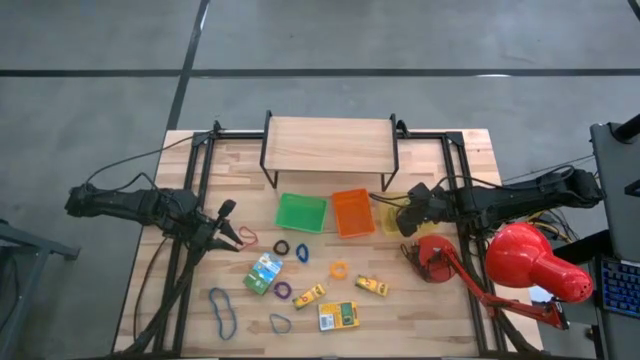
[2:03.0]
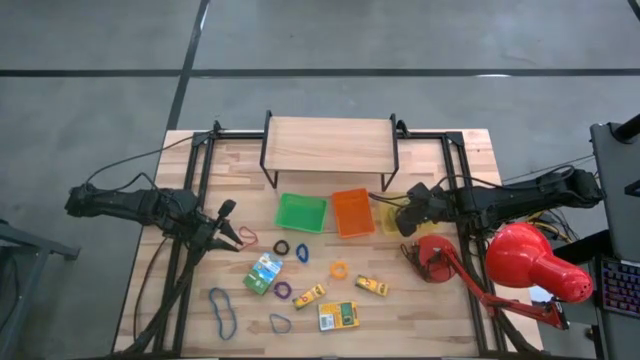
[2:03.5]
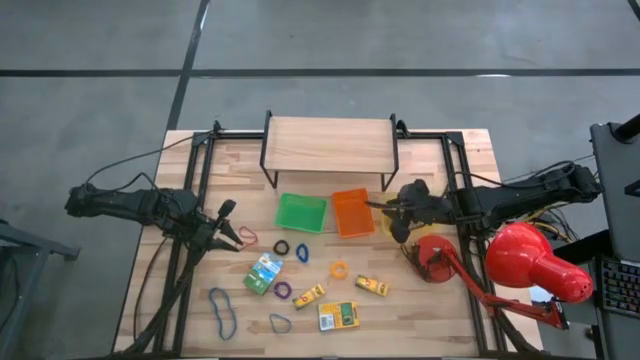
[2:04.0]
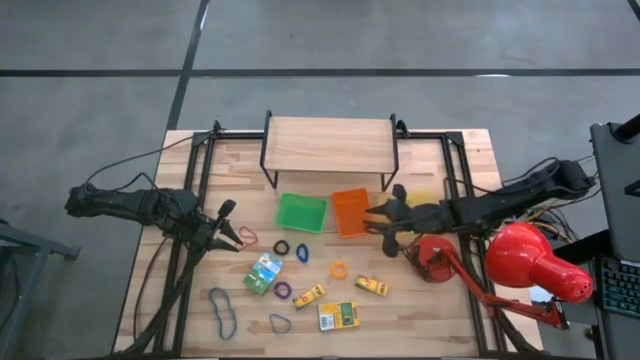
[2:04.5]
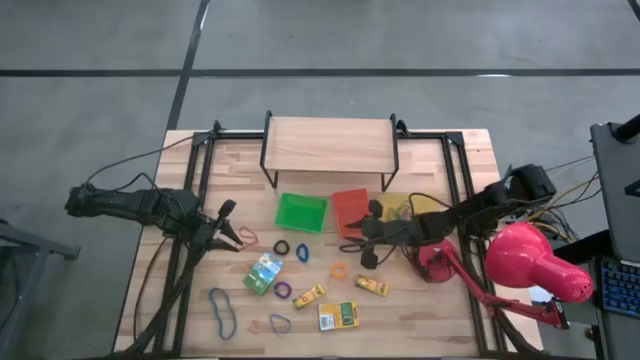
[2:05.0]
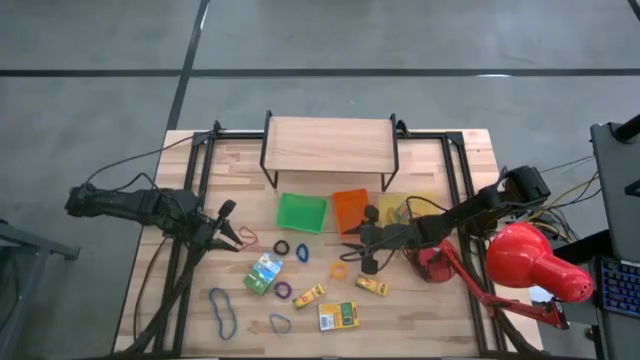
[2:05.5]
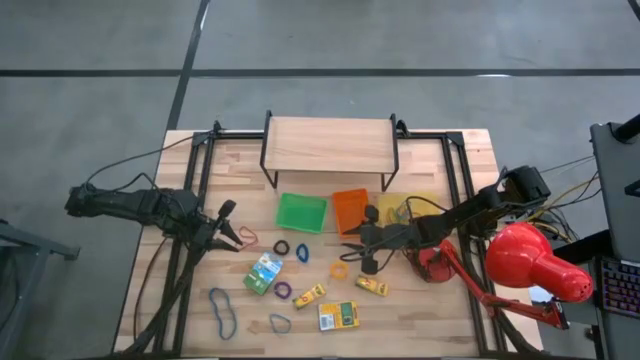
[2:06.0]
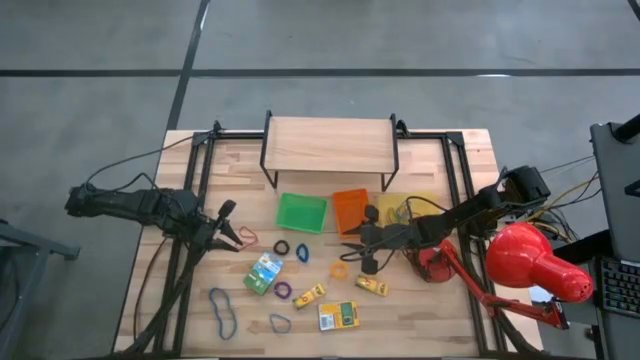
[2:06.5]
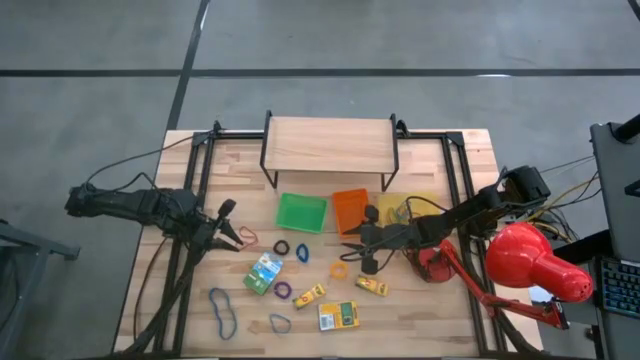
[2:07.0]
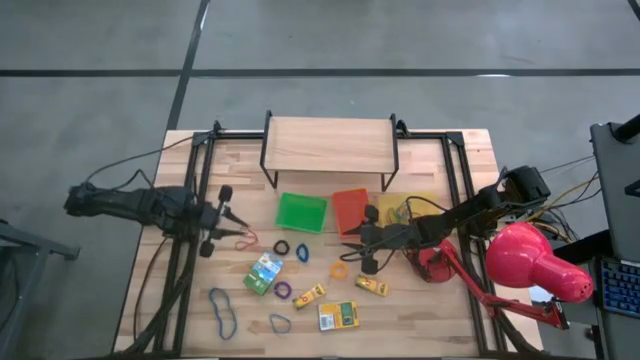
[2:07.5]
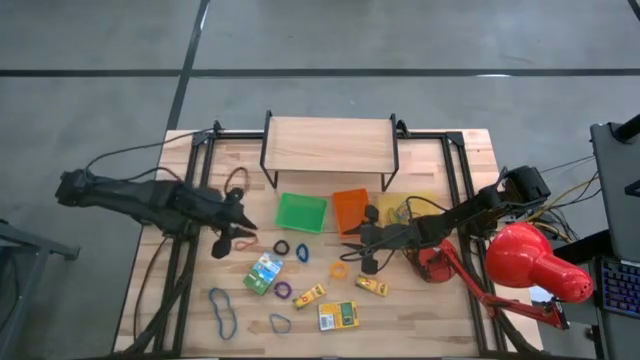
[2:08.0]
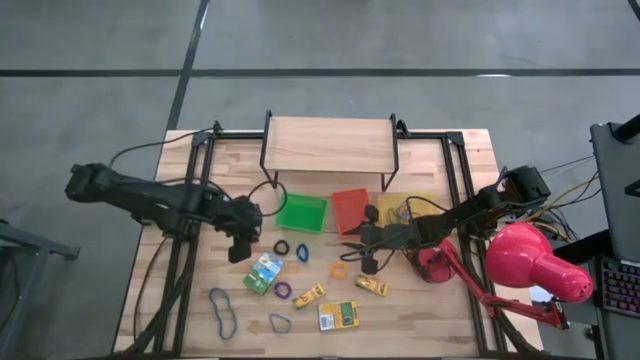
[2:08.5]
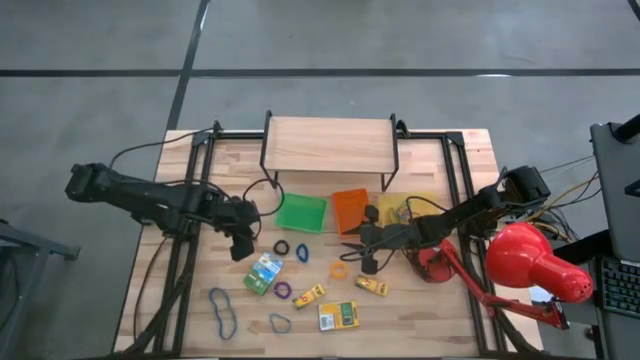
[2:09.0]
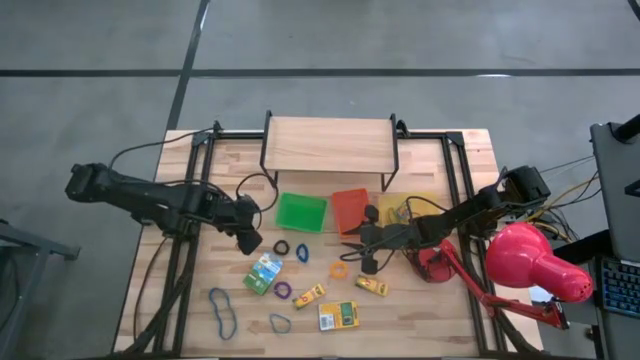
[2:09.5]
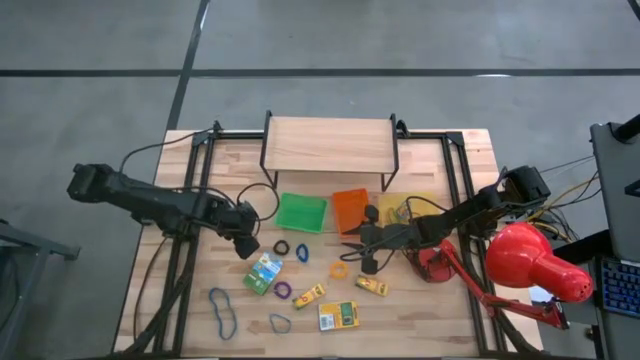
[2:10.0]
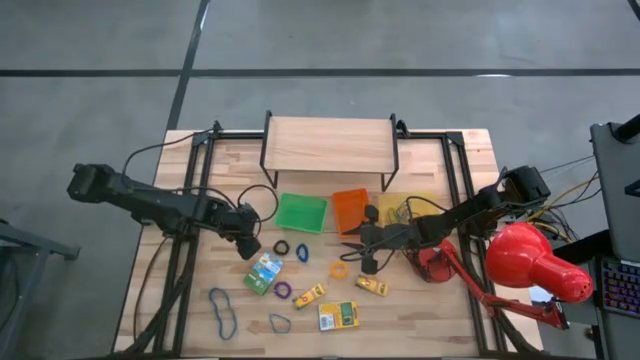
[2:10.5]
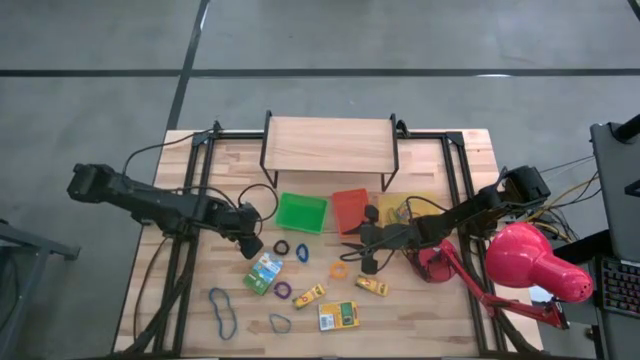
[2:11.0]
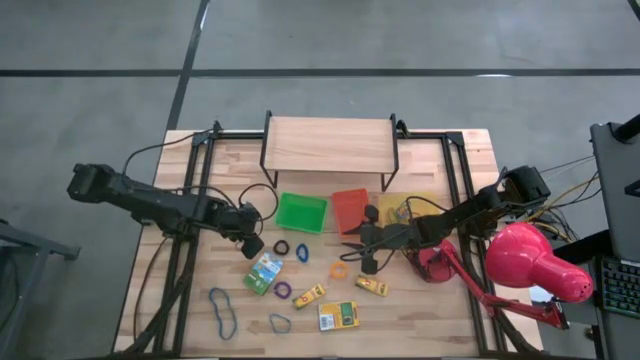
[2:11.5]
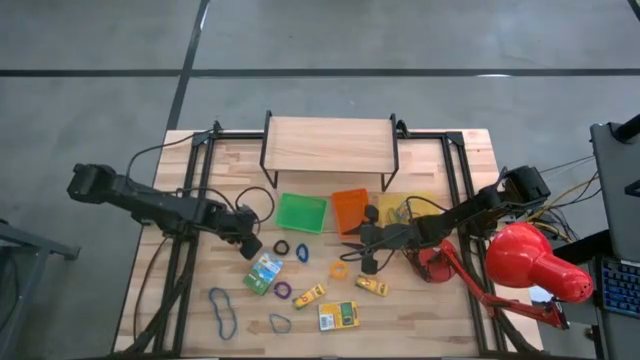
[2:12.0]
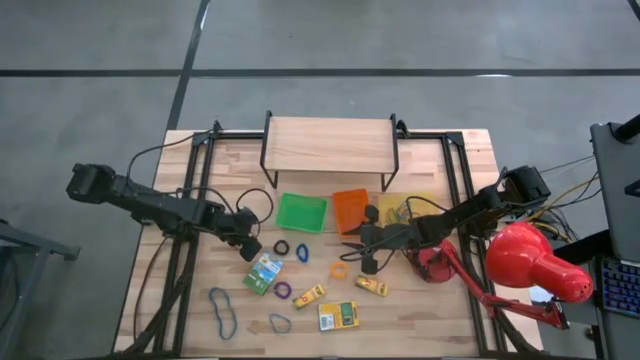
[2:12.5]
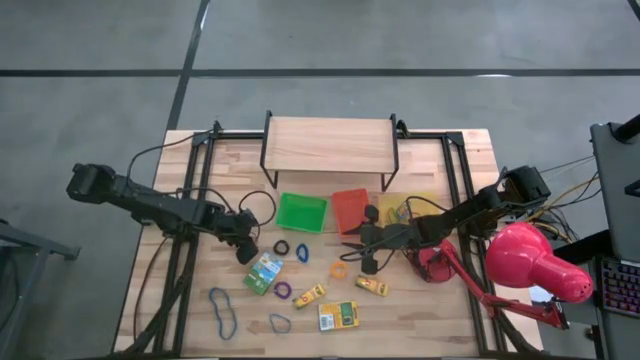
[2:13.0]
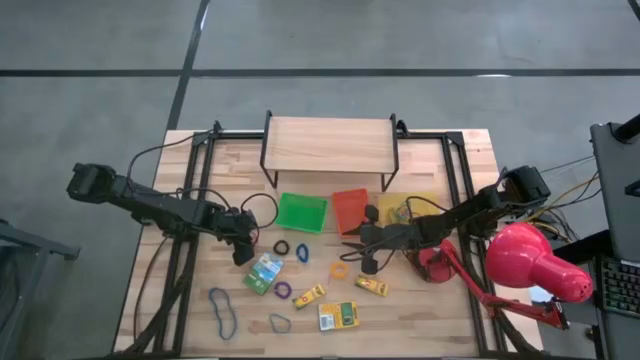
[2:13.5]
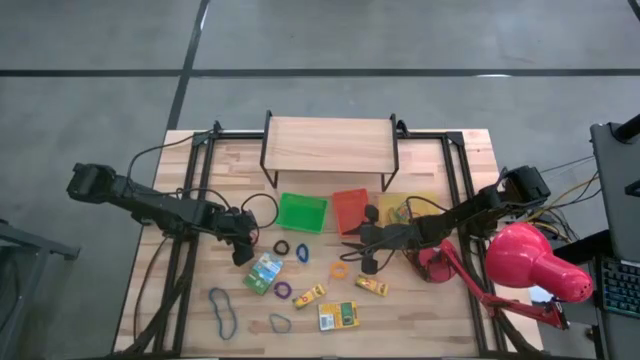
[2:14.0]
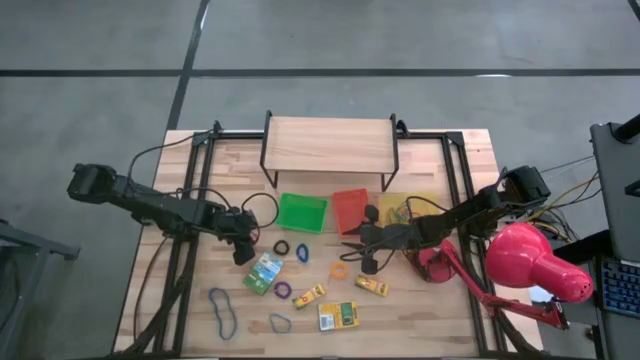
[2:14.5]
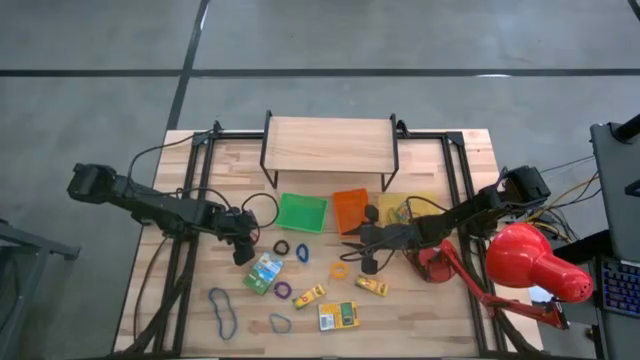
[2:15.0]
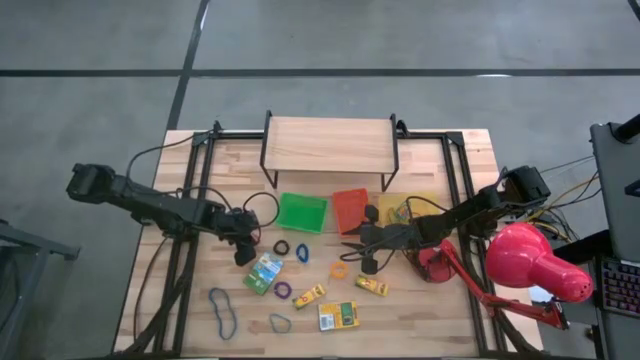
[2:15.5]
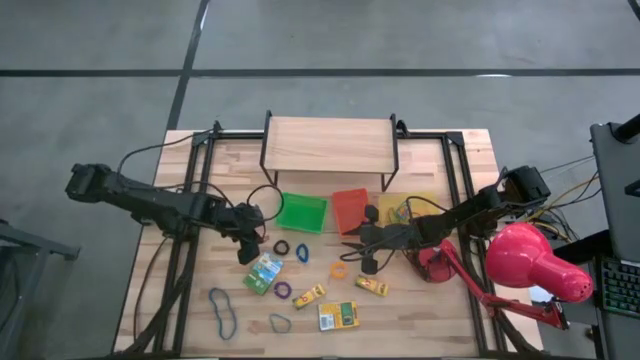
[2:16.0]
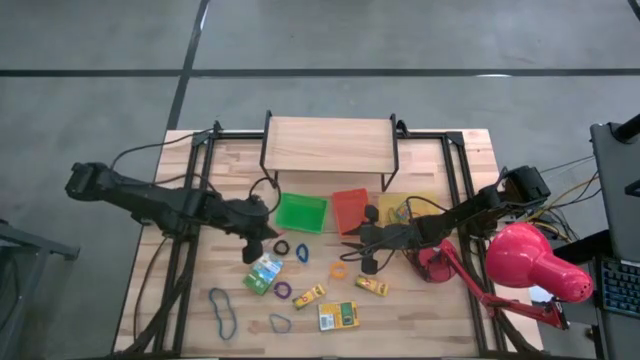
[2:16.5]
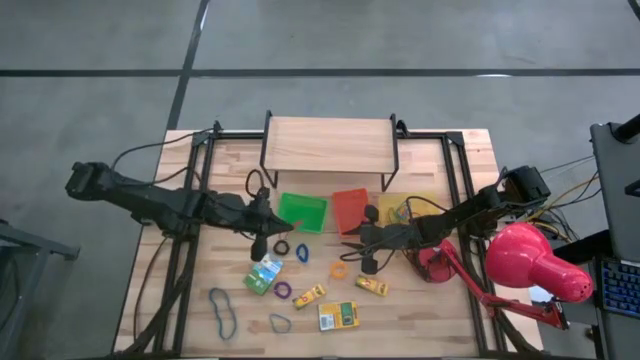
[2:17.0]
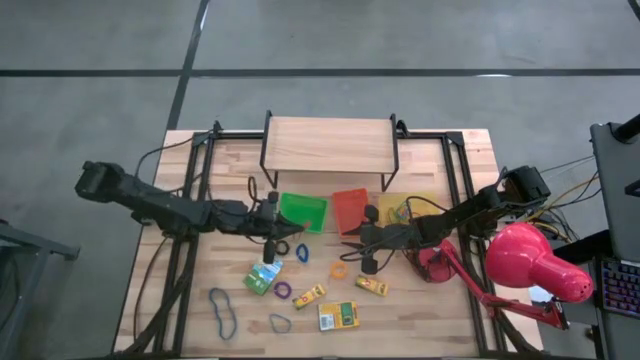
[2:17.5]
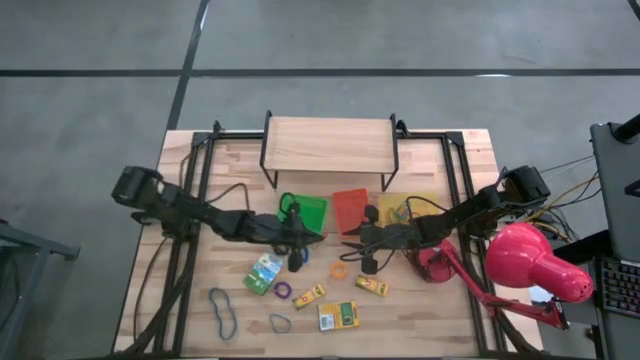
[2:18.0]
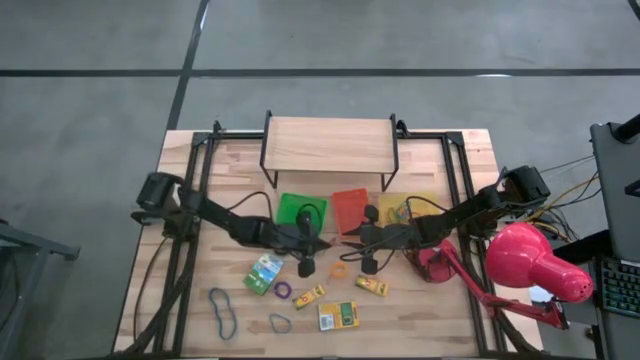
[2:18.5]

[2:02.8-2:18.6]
Task: Pick & Place Office Desk Supplies
Put the red rubber band into the yellow bin

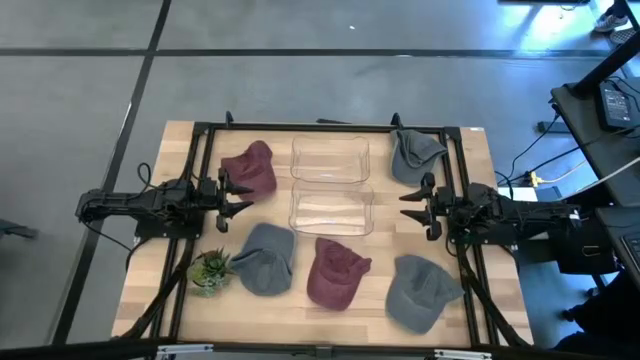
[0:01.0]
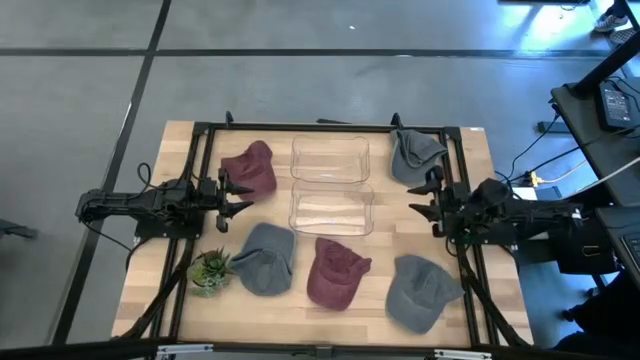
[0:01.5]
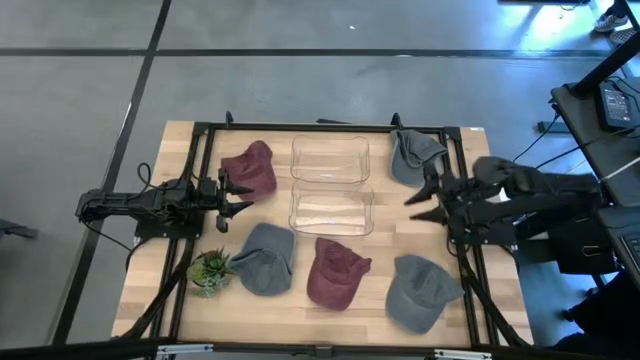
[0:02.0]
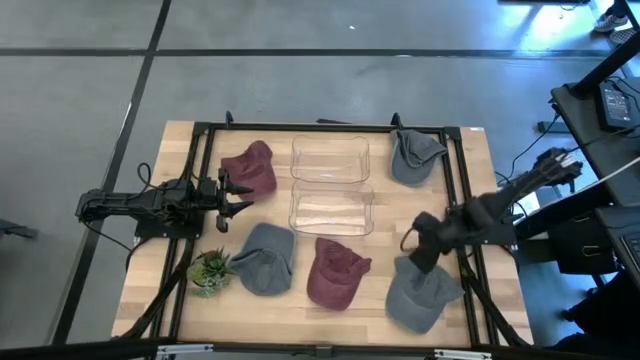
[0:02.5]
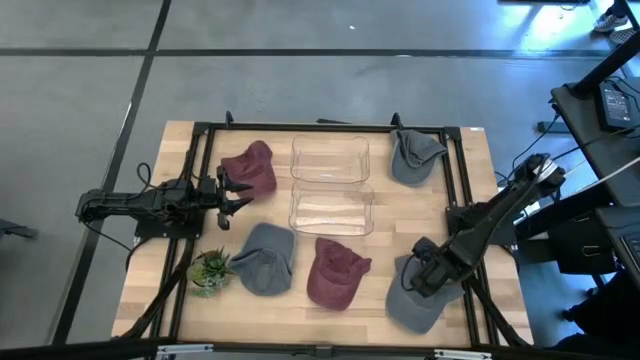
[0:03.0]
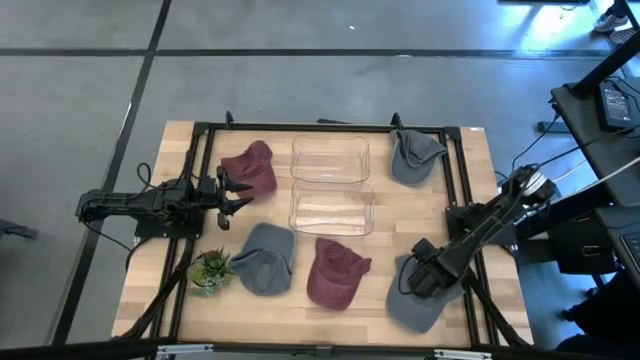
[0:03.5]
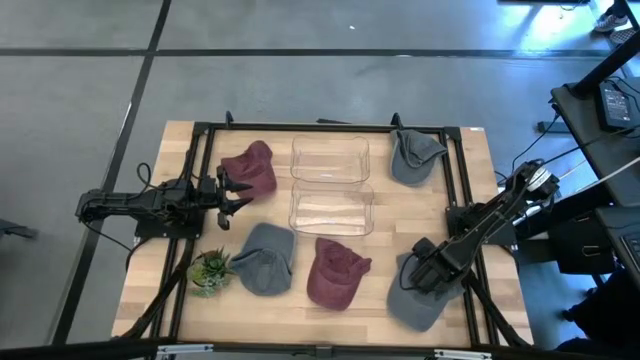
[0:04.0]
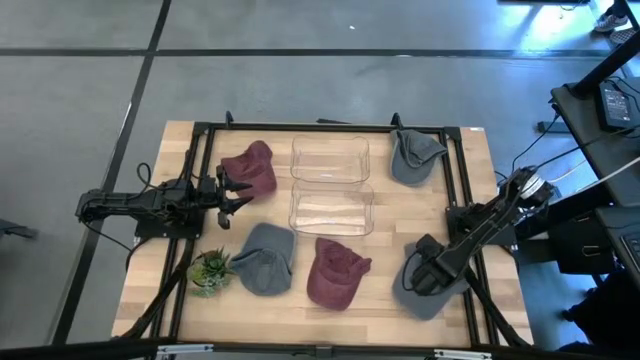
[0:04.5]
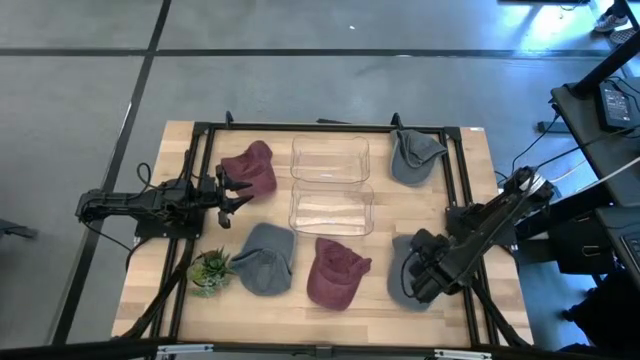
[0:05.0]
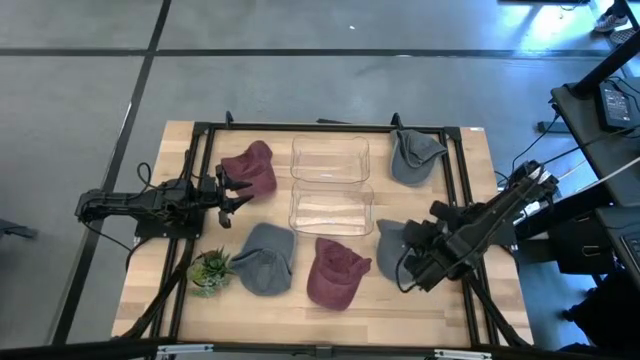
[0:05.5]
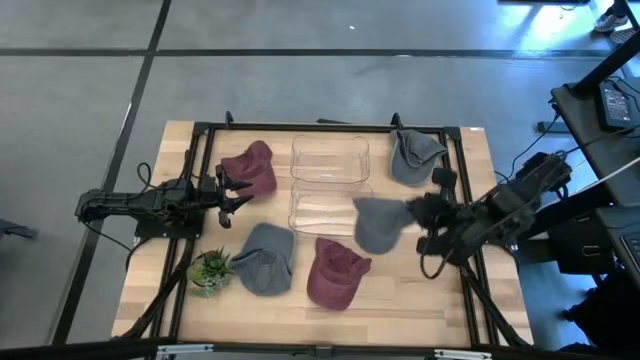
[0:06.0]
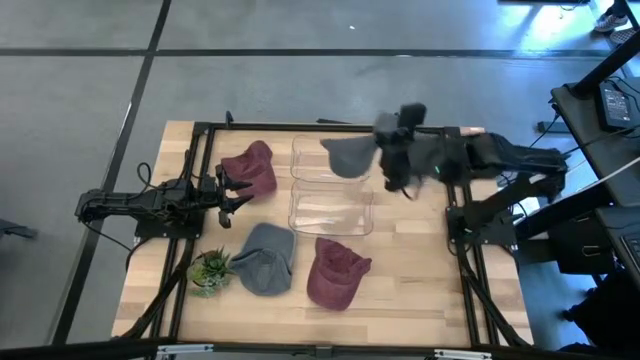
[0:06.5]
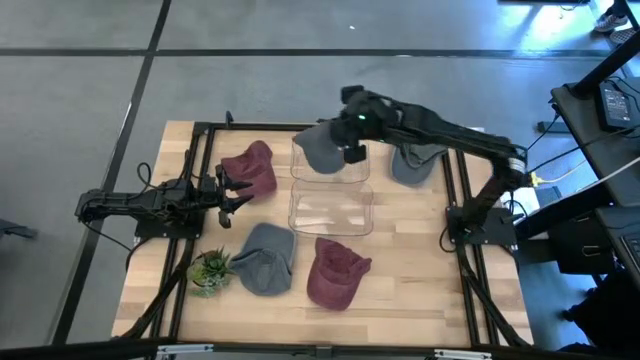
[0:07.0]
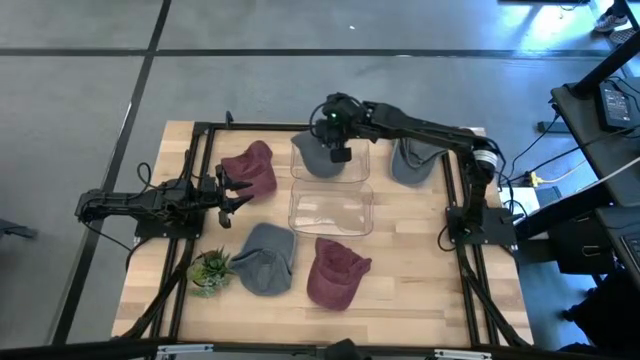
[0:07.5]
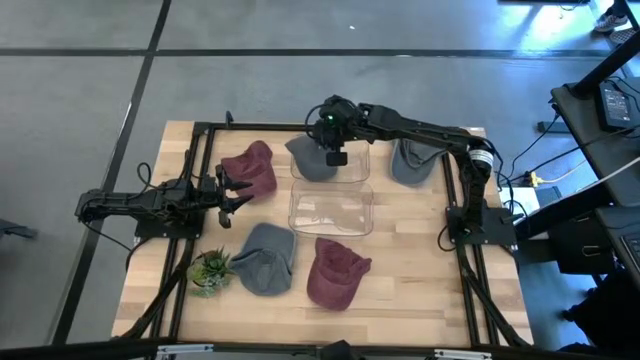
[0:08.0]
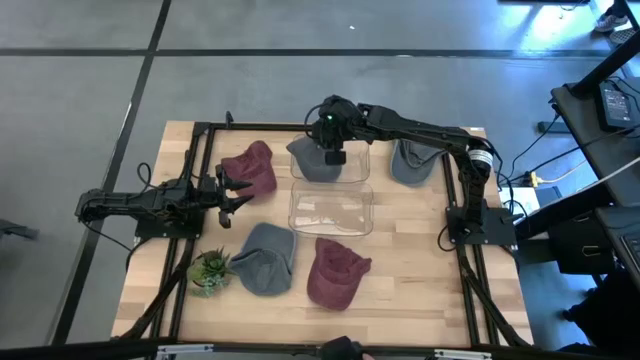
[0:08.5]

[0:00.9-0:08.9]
Task: Pick & Place hat
Put the bottom right gray cap into the top transparent bin
